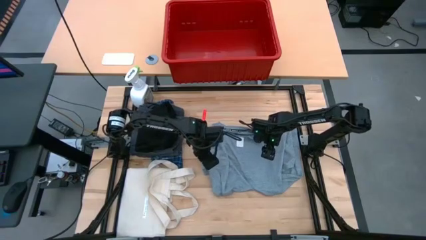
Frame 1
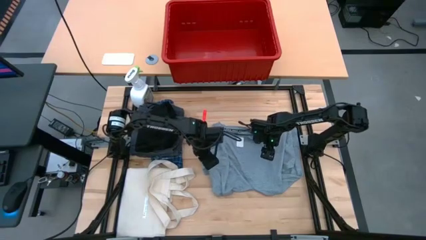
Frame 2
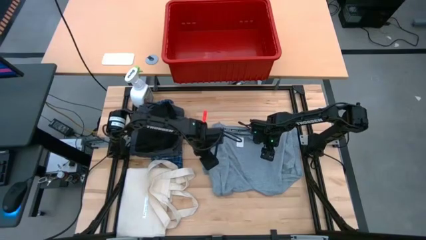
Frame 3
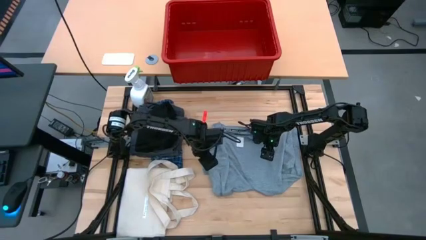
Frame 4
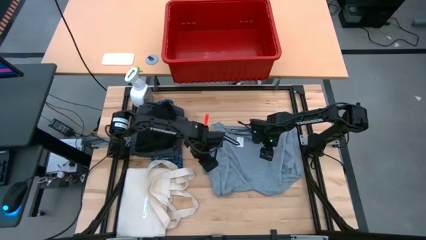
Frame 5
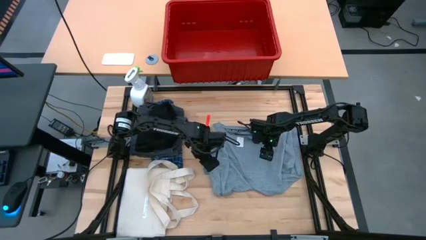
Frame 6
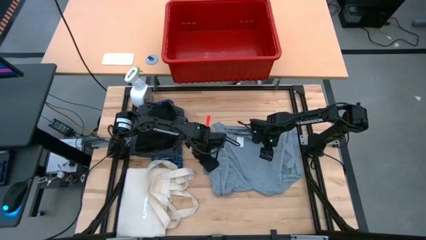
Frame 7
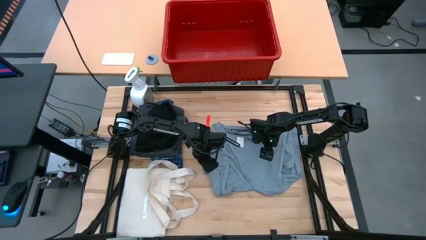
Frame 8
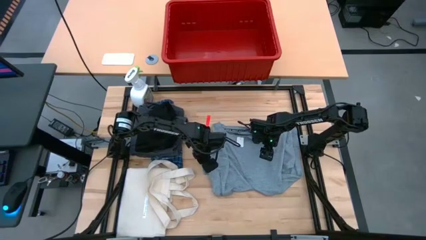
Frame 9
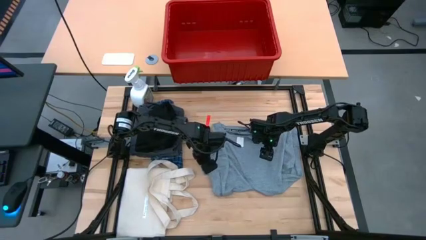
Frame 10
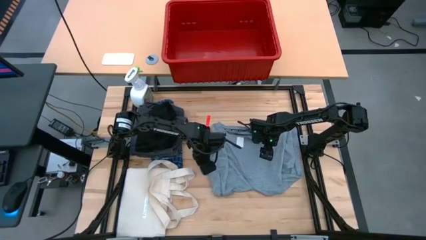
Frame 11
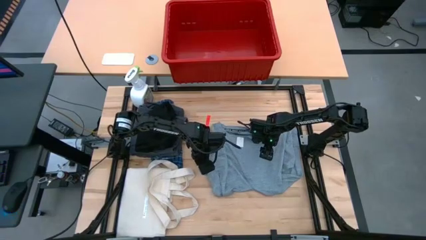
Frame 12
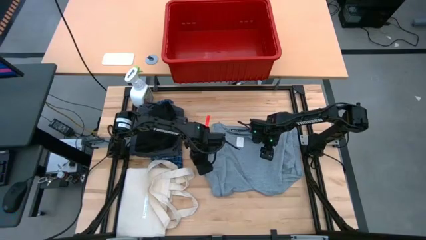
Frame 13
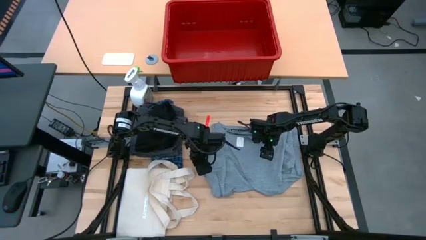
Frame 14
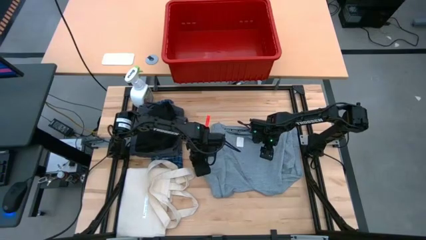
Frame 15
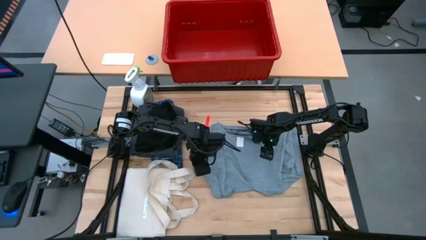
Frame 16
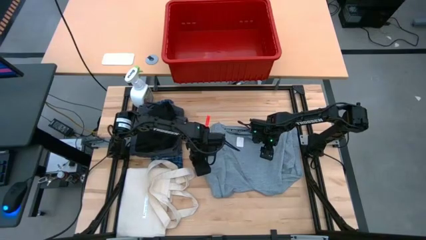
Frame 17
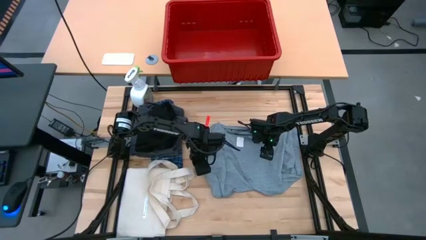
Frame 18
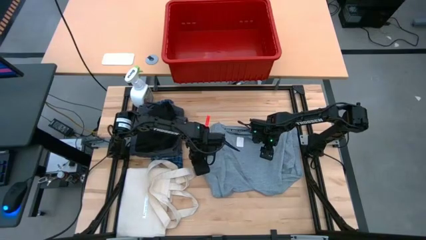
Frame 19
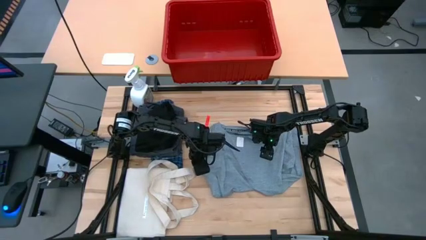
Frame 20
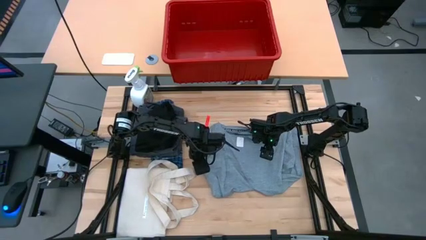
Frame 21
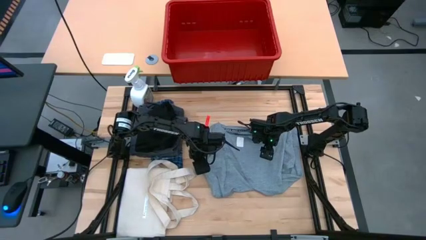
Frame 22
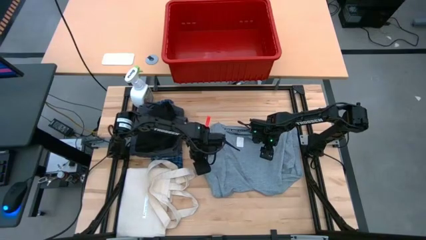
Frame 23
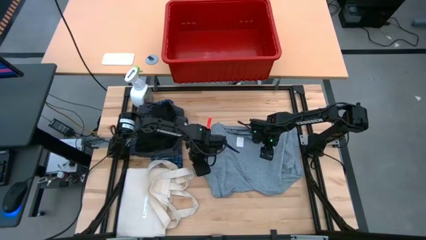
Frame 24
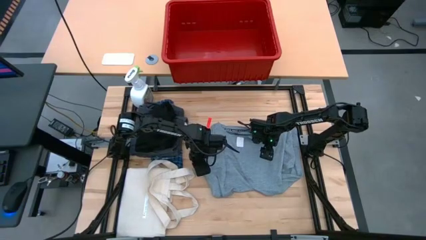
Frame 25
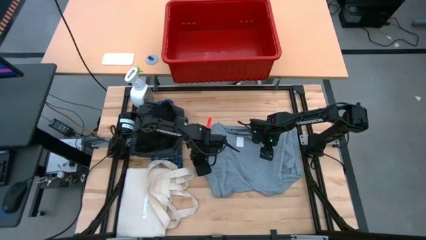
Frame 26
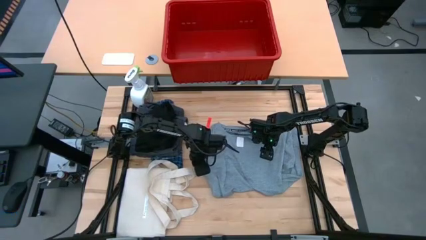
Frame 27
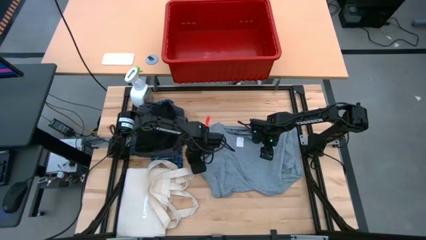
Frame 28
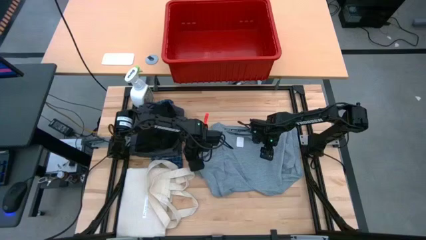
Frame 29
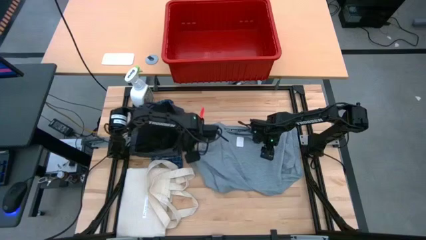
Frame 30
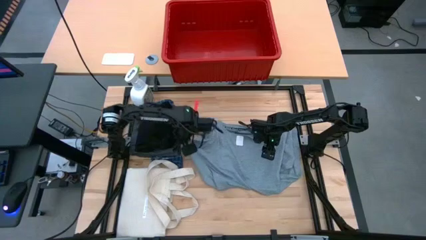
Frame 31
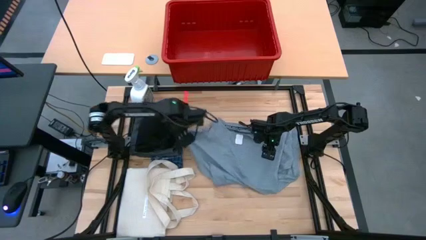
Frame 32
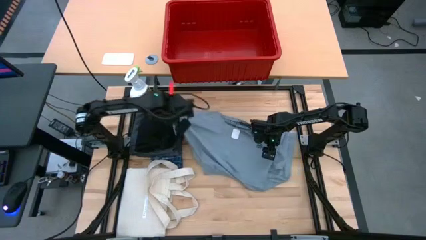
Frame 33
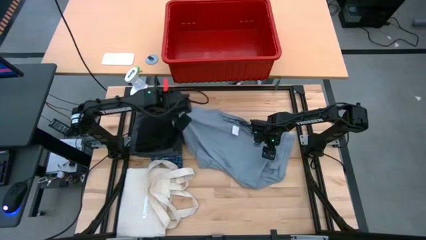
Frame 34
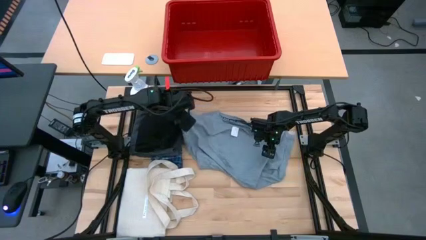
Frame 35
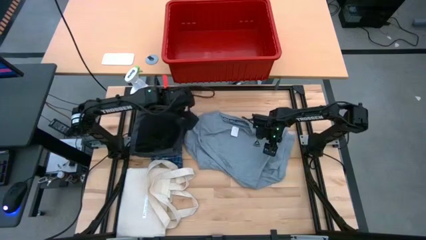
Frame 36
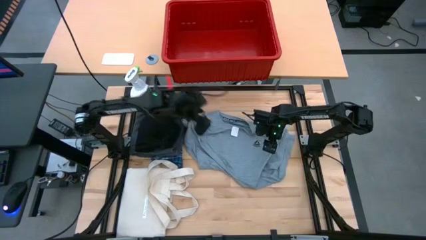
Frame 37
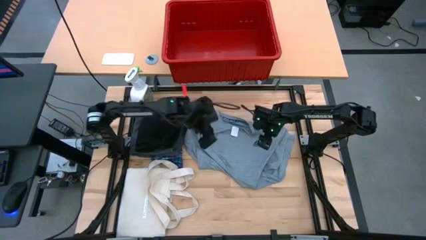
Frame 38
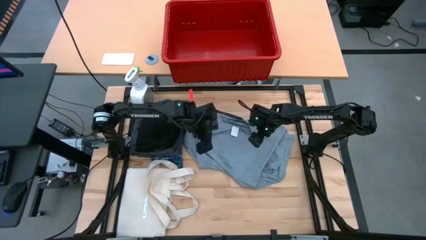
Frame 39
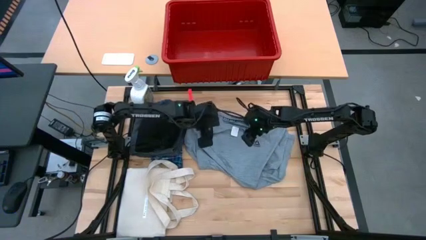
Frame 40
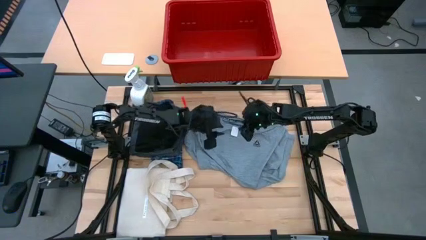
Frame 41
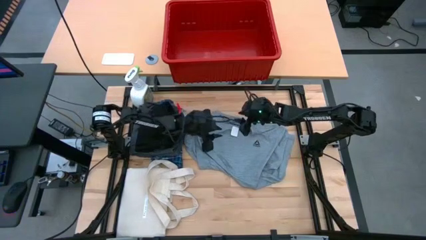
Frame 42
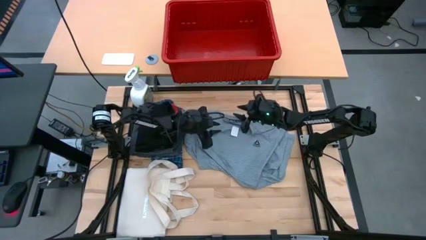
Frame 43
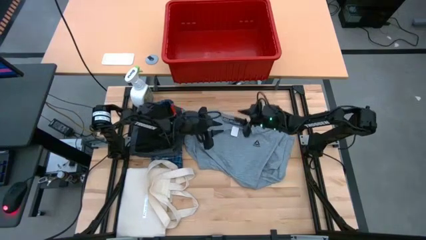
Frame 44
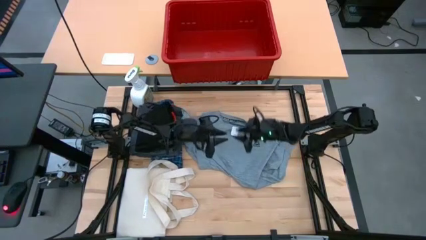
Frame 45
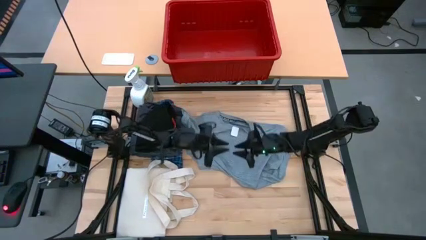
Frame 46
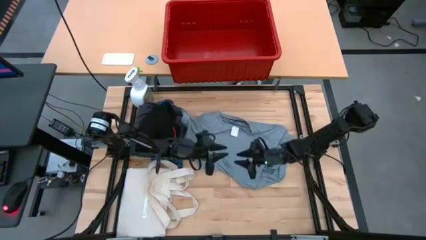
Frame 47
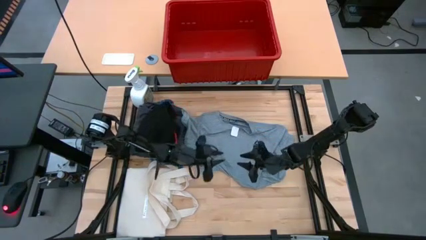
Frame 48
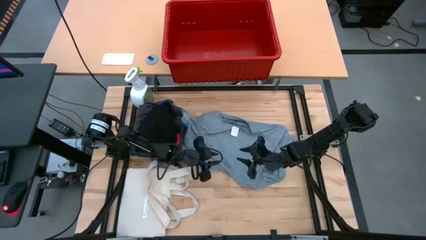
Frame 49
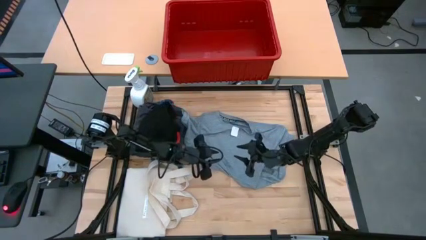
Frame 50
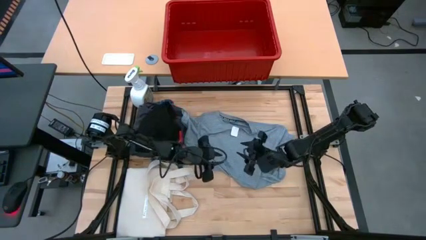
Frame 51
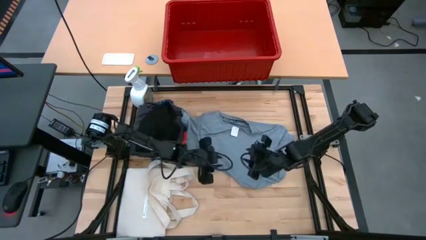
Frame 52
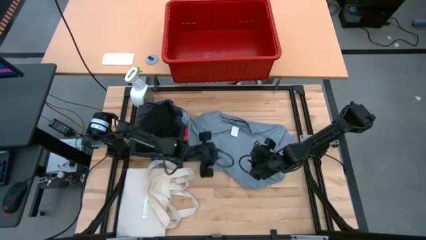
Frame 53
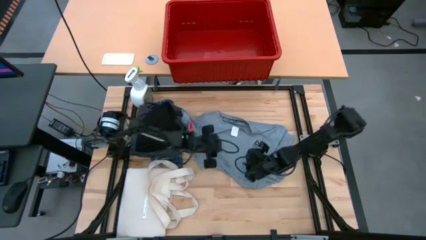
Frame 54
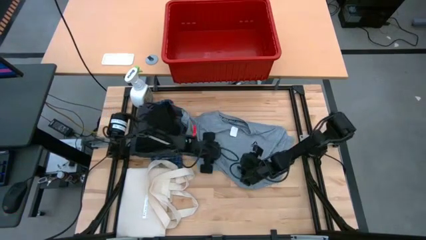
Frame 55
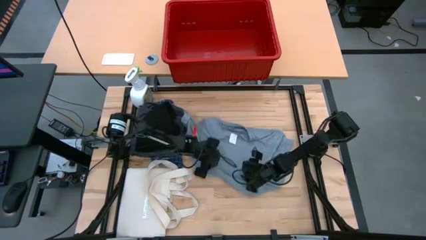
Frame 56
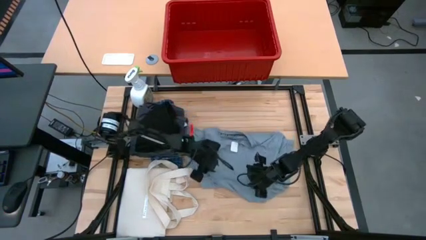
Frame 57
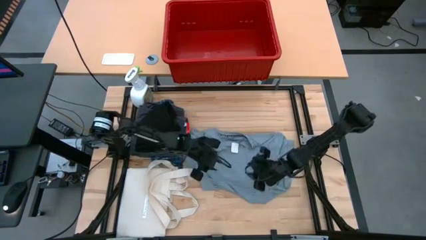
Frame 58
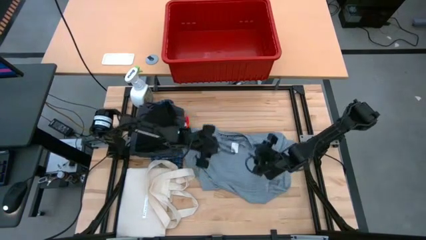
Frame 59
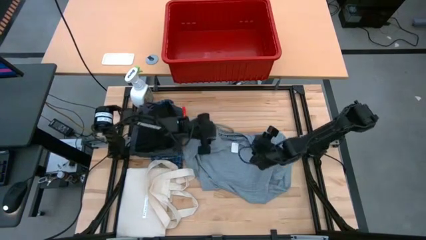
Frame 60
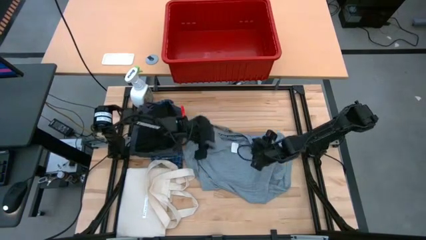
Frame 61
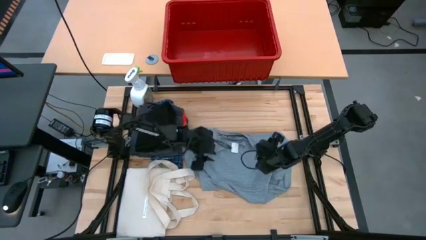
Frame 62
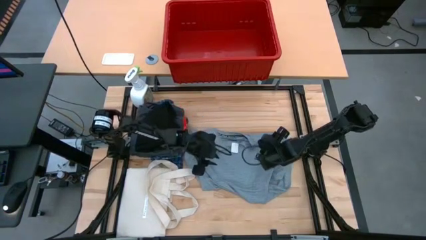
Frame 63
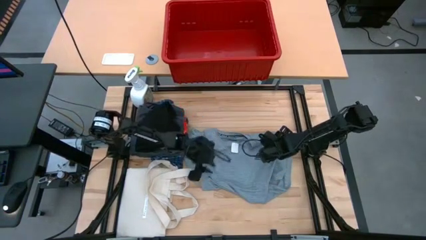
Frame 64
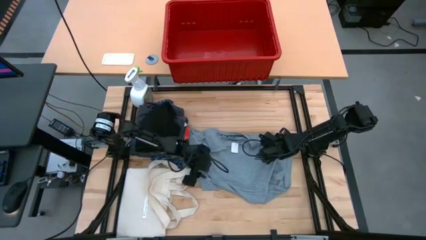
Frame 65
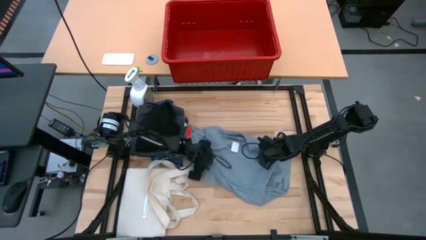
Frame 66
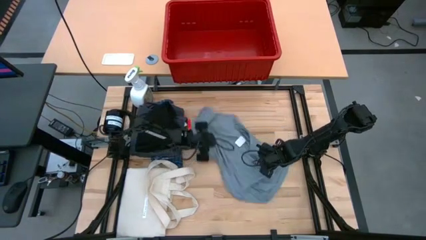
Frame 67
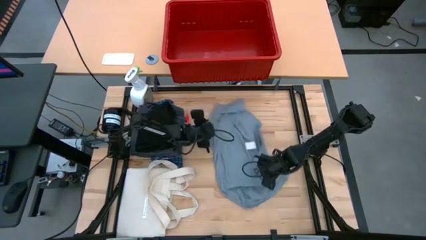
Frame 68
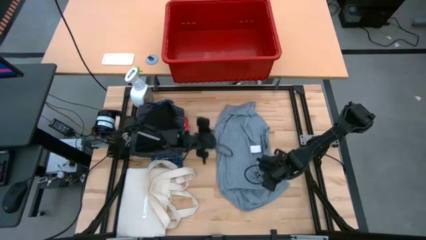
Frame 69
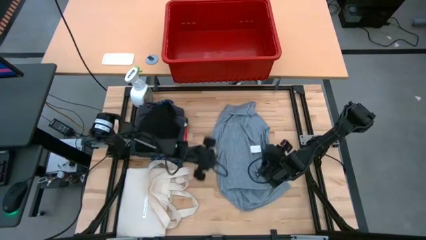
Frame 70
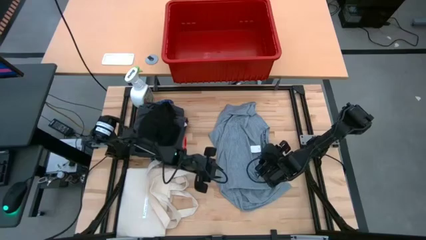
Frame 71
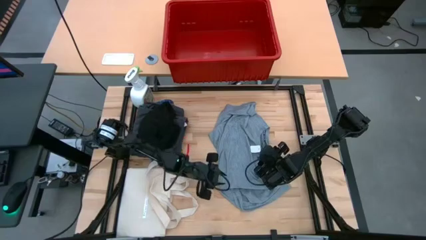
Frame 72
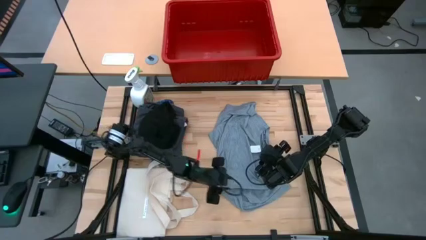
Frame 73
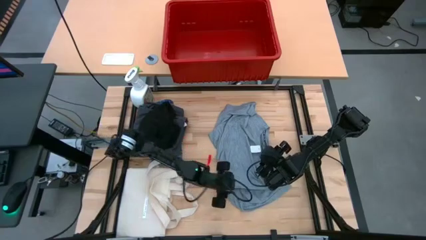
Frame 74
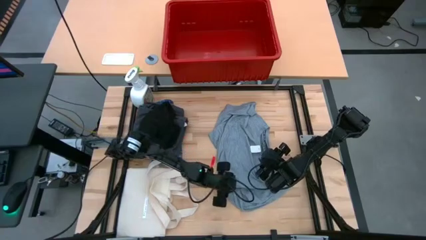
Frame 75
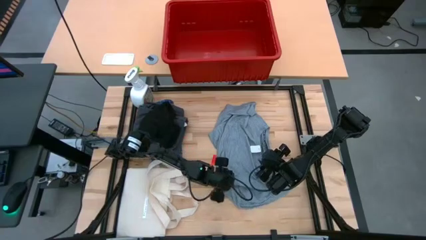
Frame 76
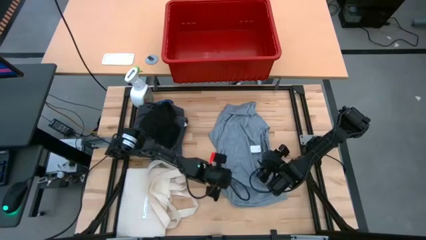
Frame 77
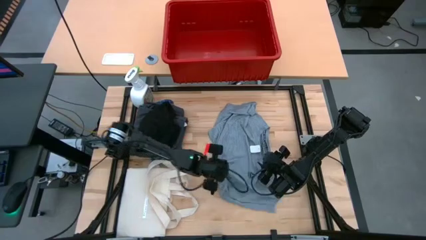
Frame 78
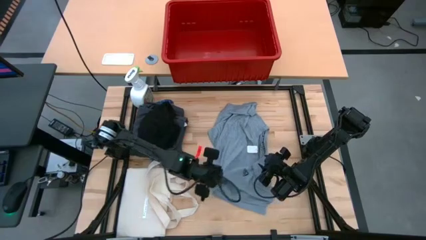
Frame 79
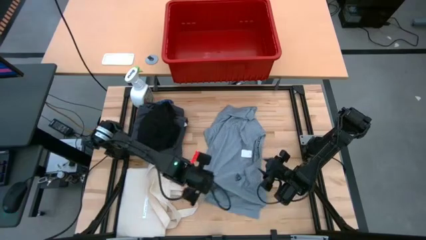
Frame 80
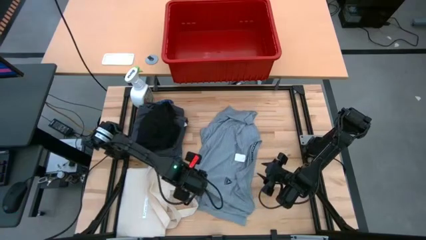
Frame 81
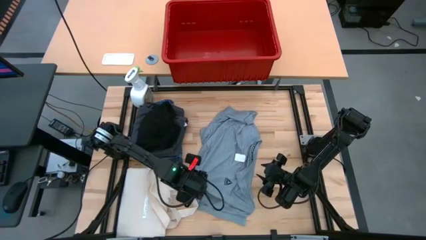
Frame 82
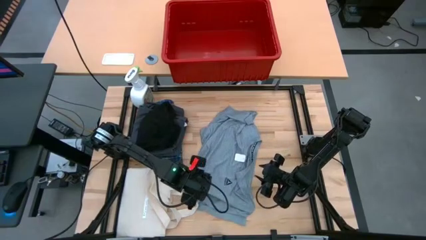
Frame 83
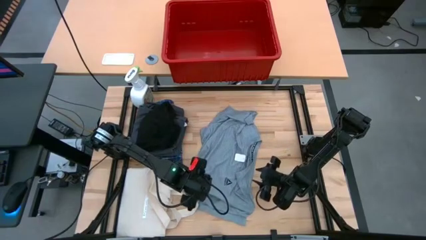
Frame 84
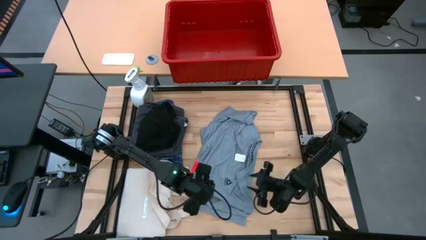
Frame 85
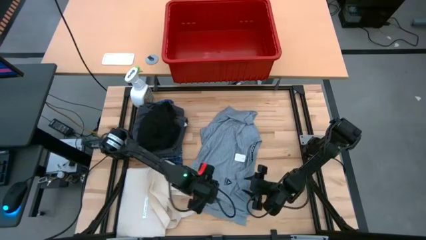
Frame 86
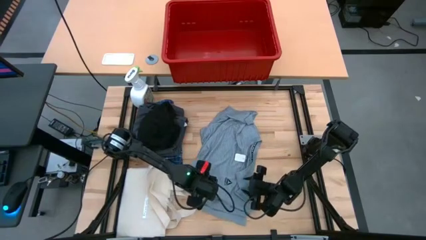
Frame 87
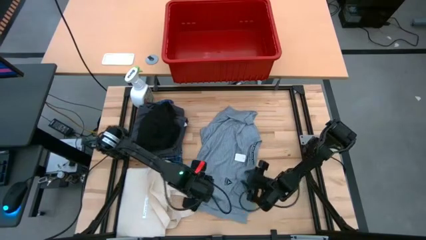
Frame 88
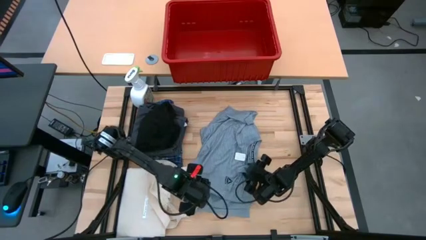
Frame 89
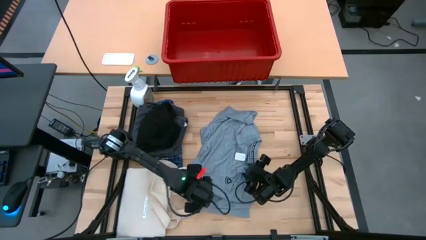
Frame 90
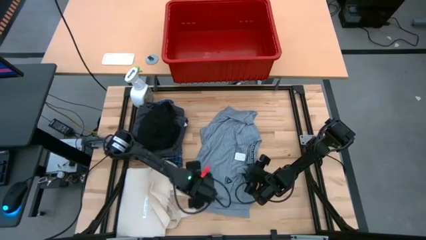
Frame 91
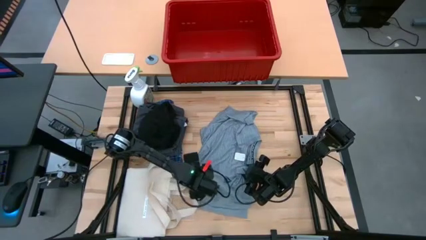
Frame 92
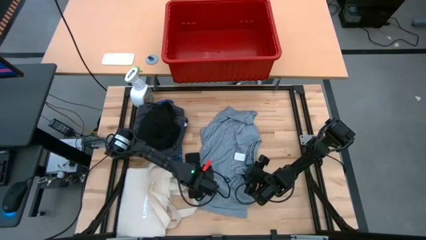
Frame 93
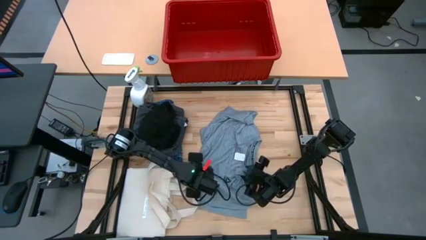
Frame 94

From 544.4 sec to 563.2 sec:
Task: Fold Laundry from Bin
Fold the gray shirt
